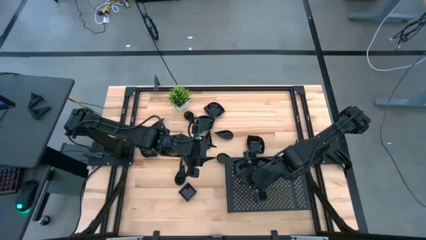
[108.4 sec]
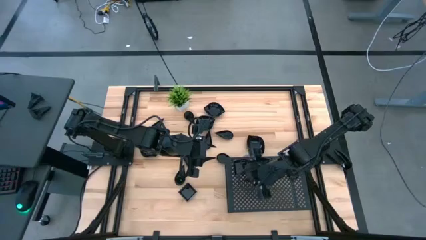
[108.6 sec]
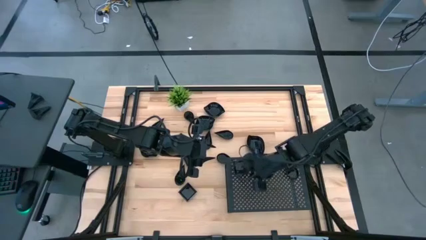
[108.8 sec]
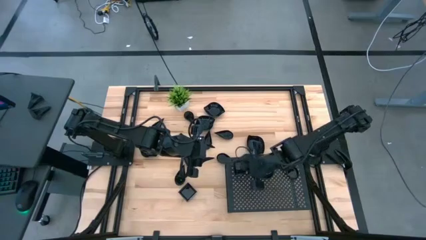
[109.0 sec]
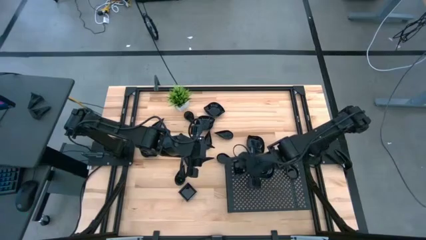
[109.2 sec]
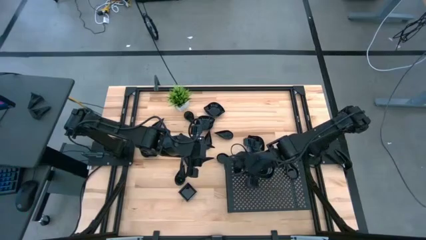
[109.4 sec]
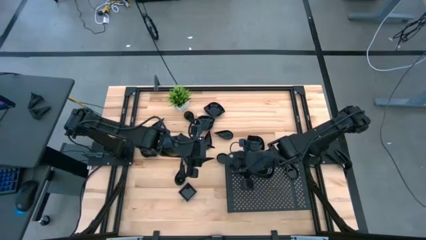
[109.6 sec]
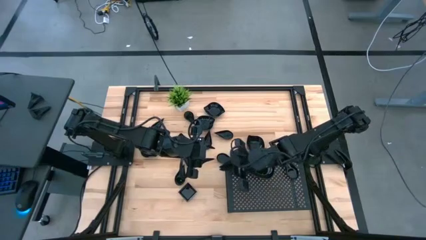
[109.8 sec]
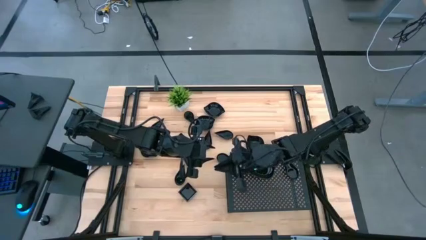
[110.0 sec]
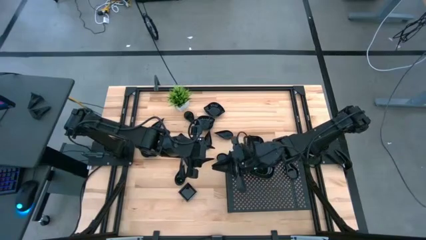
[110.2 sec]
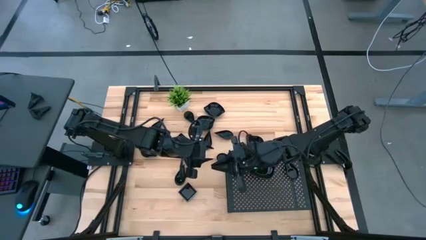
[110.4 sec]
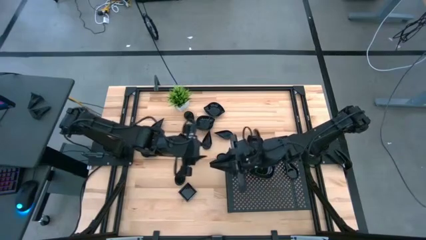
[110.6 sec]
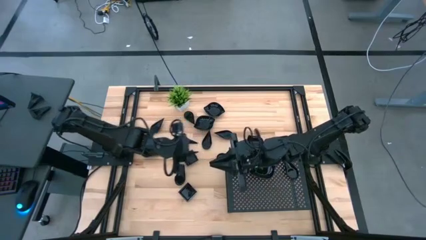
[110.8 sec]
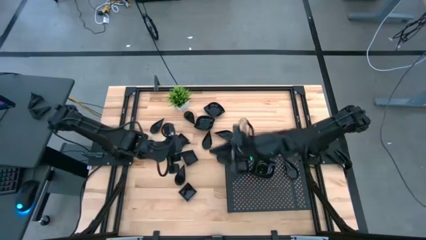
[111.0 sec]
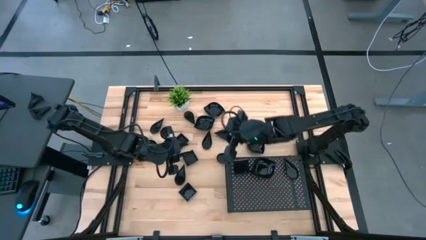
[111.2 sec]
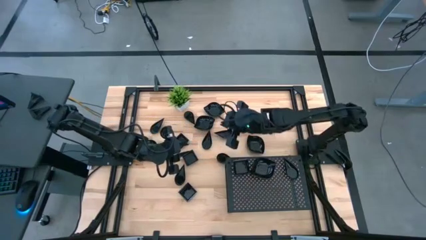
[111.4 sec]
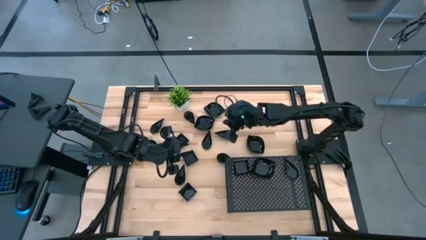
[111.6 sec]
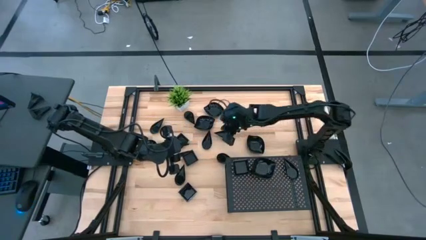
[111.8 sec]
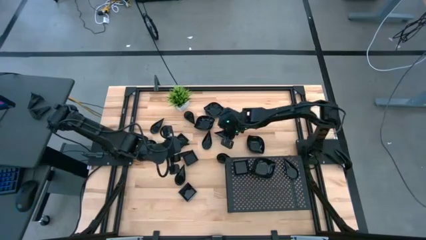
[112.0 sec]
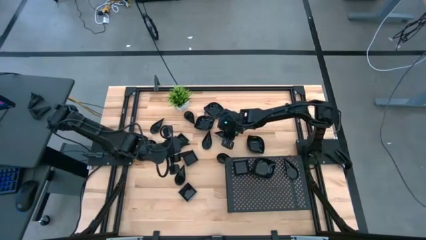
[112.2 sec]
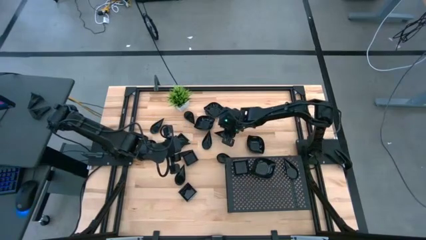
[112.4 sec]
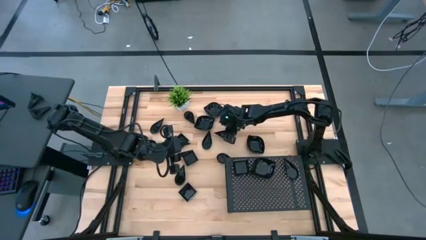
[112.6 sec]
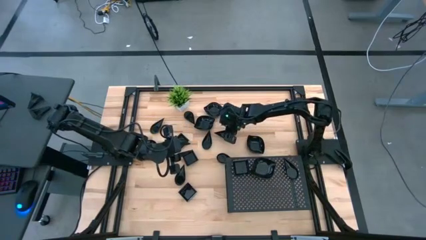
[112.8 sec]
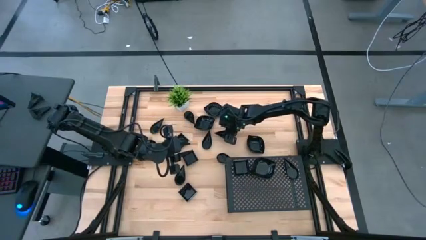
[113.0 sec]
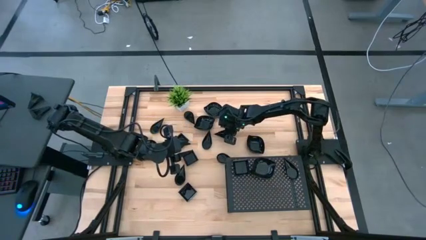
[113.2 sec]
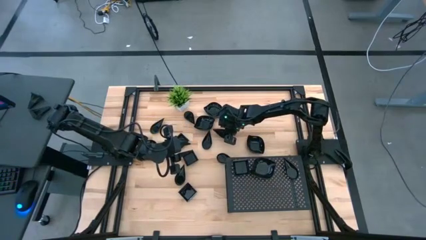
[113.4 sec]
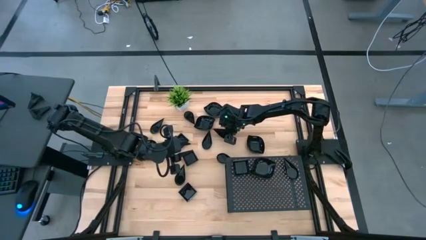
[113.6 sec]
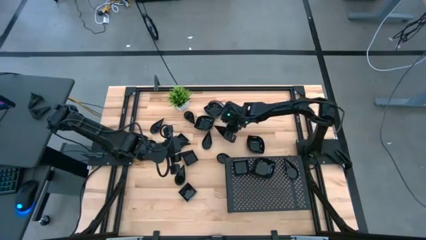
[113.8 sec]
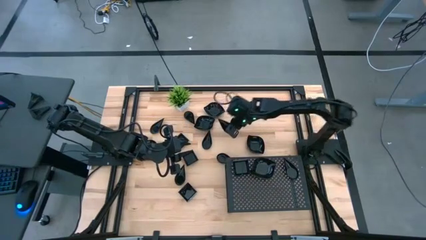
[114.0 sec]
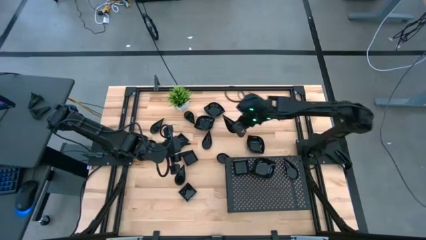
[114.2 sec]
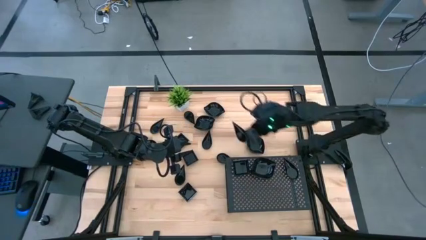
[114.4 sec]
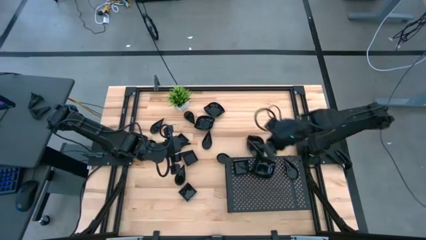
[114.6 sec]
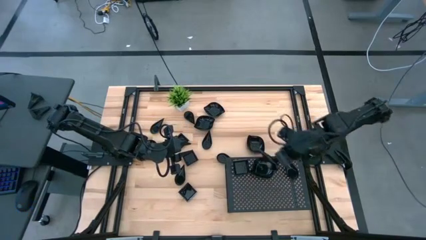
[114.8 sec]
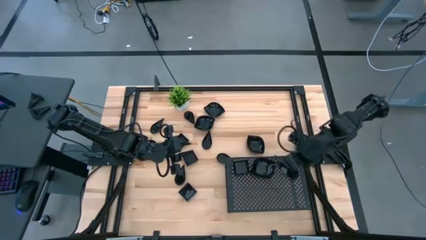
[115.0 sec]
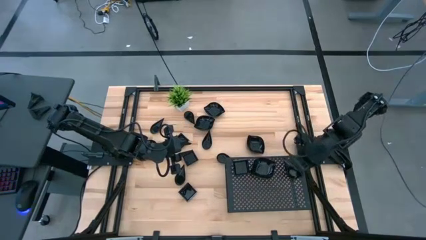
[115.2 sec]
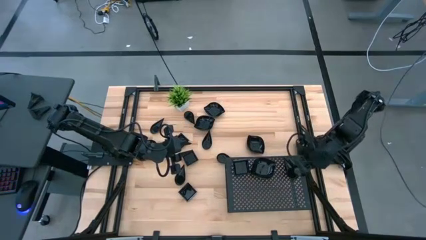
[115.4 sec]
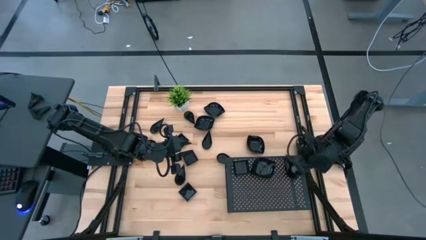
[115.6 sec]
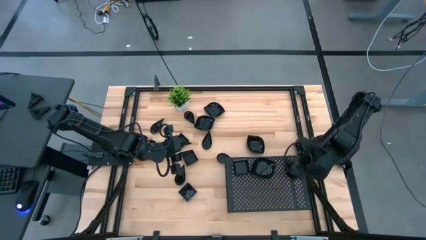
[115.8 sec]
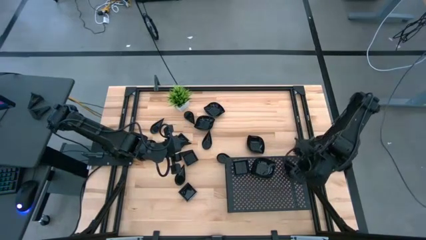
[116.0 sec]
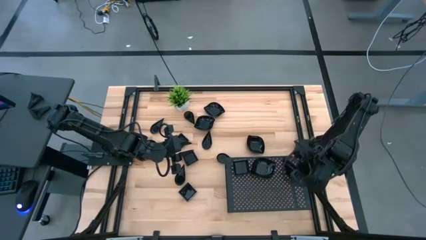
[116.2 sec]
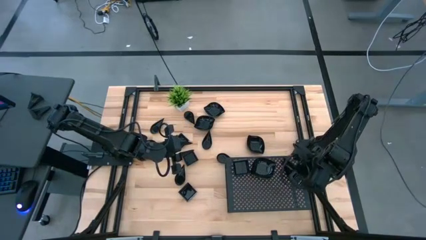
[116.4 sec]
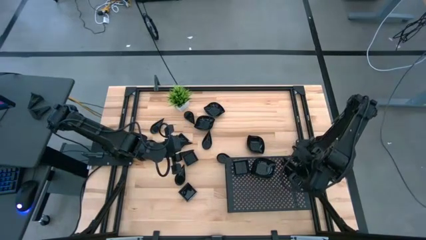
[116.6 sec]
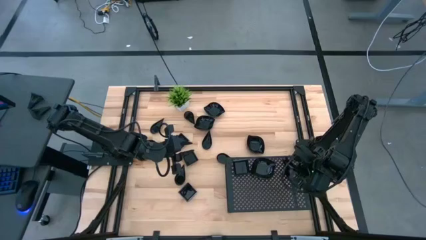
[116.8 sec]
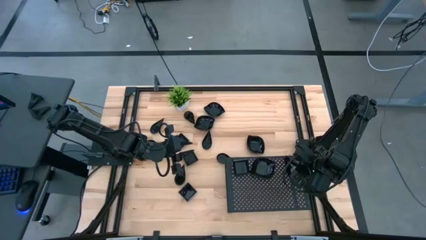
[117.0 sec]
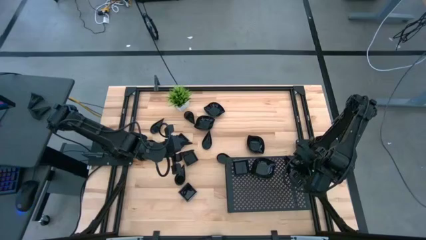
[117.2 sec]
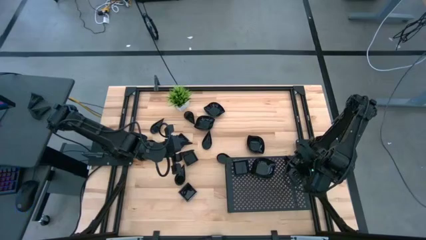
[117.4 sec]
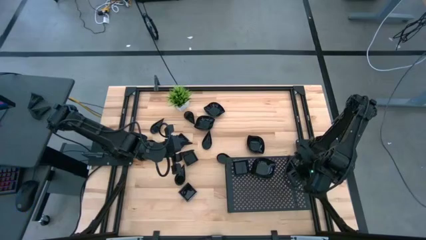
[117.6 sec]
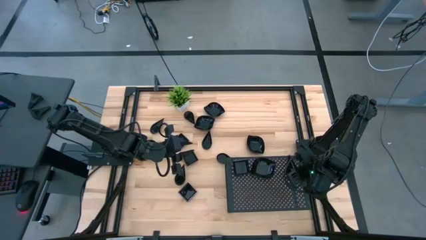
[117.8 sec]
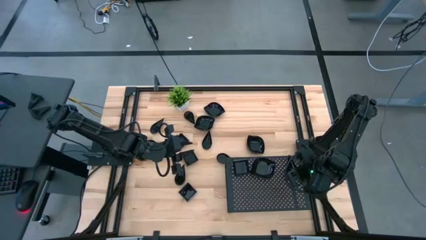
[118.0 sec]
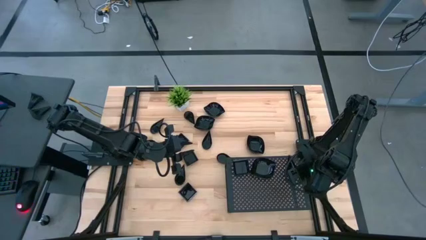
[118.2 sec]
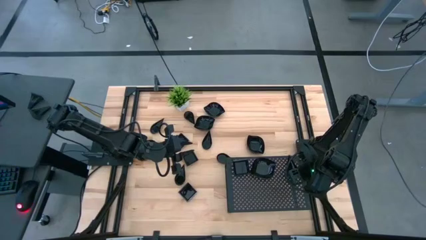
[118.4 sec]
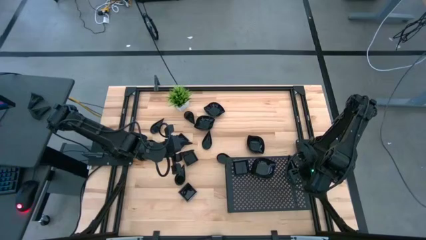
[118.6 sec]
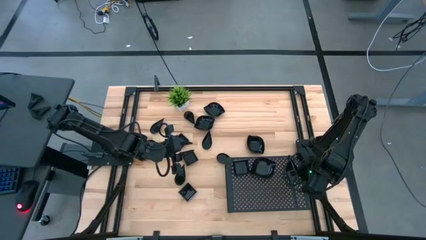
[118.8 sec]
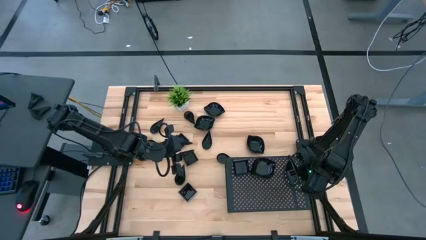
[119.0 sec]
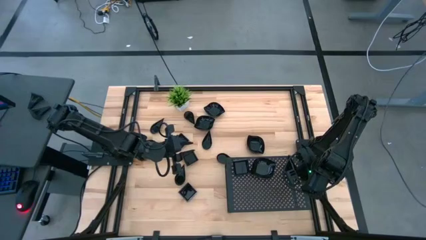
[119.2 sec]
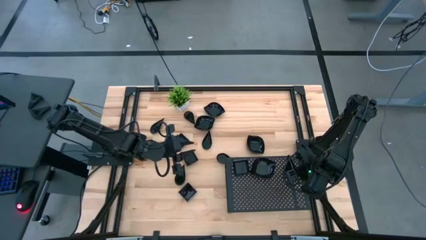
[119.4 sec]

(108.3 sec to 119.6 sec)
Task: Pick & Place Mini shaped plates
Stack the drop shaped plate on top of the drop shaped plate on the shelf

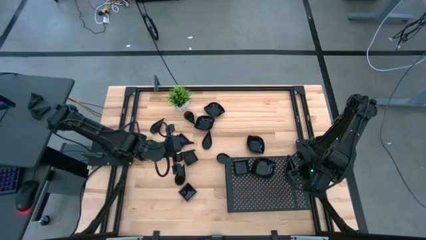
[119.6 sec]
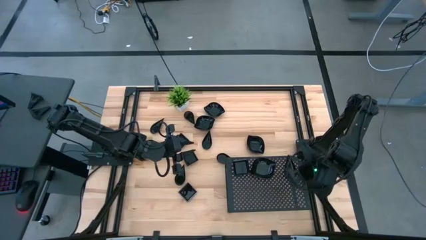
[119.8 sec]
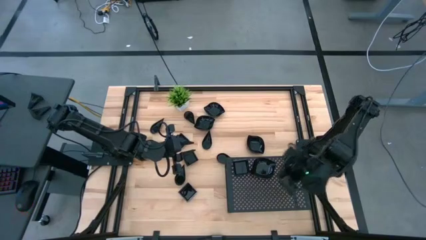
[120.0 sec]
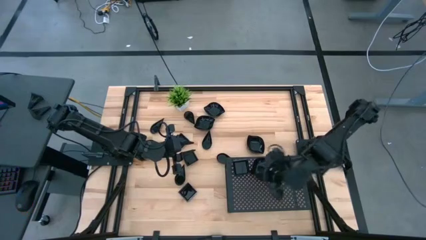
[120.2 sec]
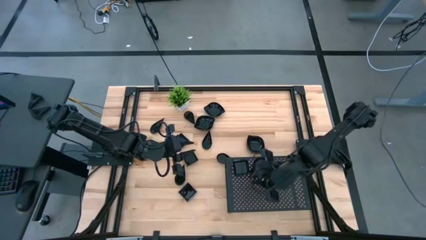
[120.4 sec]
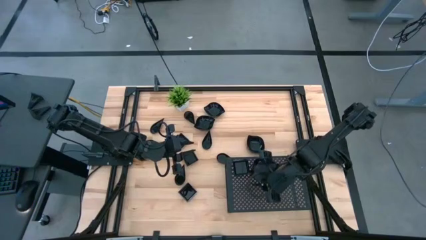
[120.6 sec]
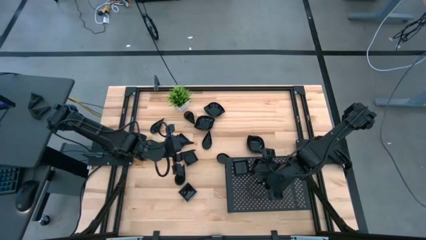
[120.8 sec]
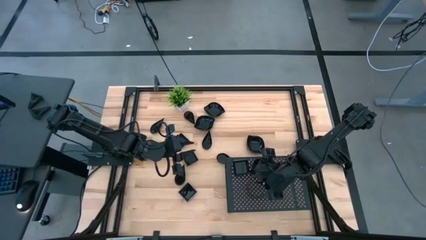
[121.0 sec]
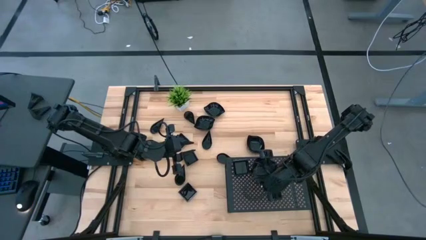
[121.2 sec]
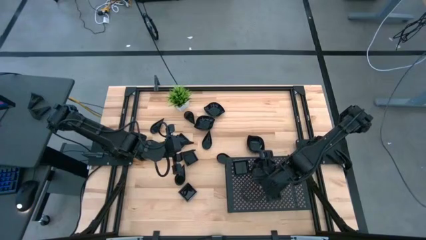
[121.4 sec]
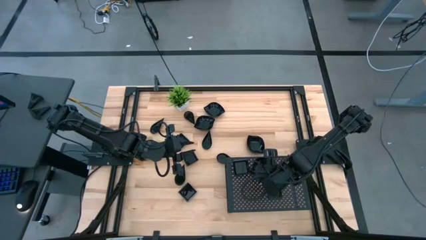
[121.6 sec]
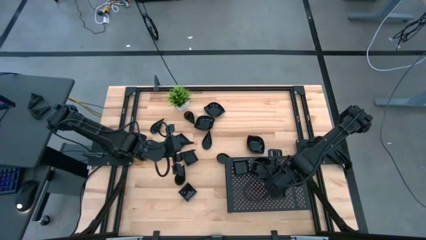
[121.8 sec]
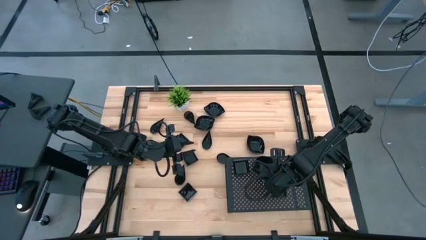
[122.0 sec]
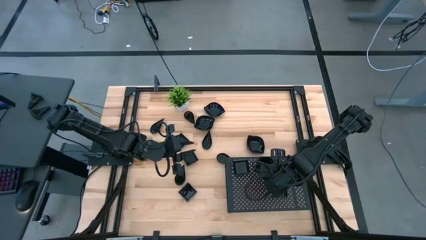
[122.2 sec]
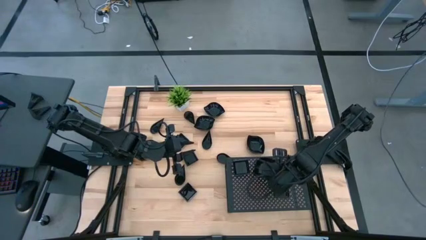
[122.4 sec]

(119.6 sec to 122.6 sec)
Adjust the stacked leaf shaped plates on the shelf

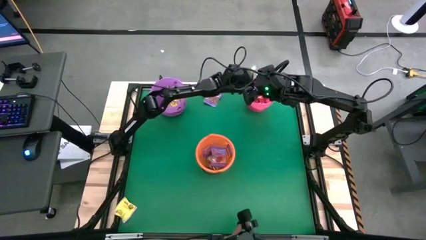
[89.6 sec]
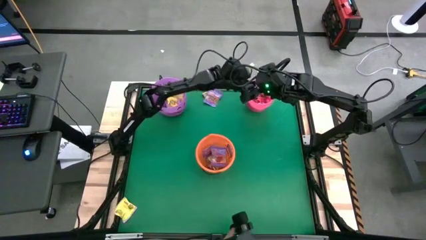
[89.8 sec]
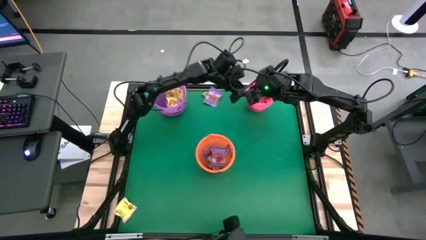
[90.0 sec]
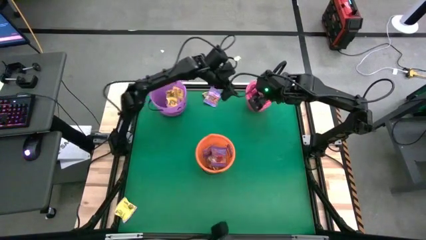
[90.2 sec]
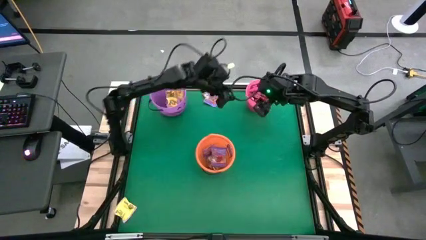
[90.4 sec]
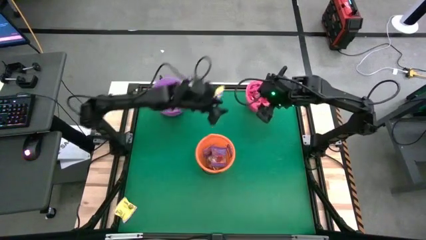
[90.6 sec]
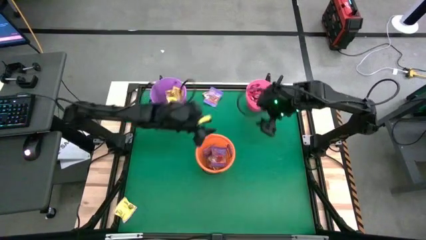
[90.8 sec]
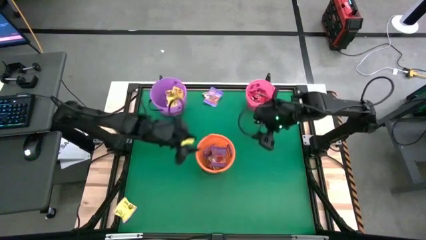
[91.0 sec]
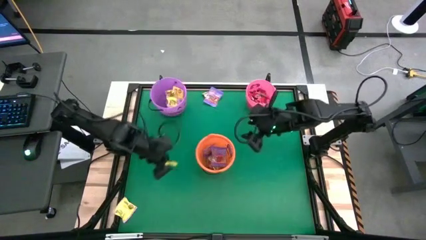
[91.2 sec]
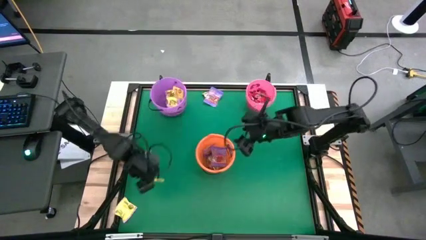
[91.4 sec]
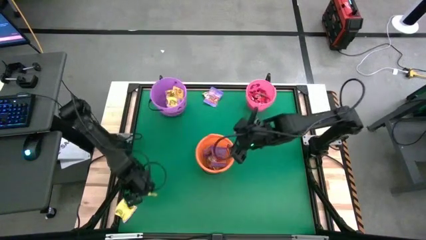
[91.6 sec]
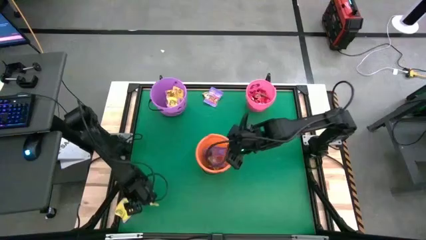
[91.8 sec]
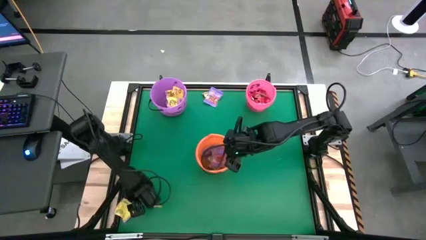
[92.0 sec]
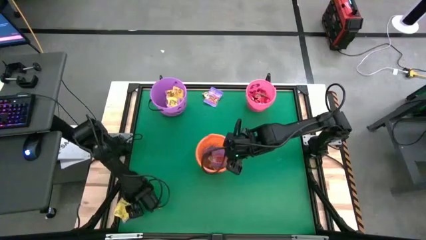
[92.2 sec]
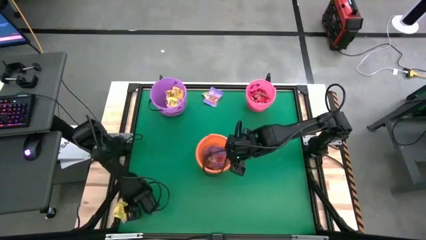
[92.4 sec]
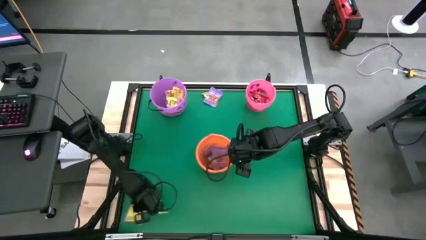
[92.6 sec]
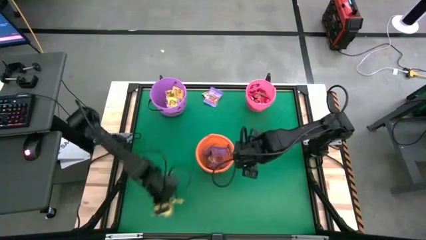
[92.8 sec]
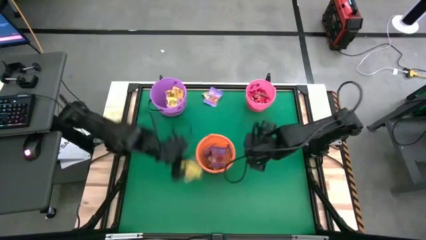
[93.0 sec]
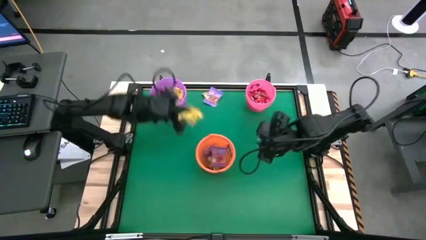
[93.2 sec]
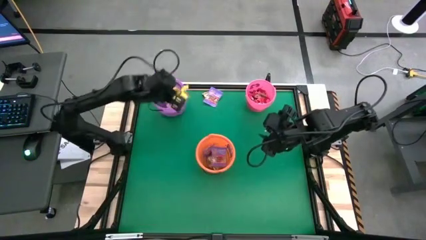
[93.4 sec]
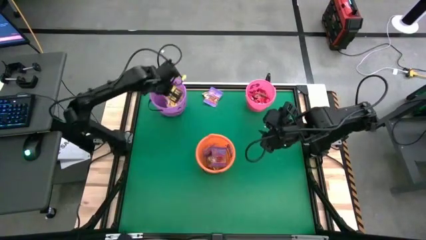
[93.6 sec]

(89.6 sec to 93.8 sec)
Task: Sort candy by brand, put in halloween buckets
Put the yellow candy into the light violet bucket
